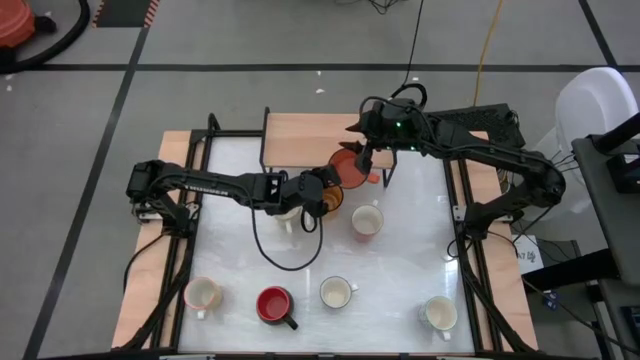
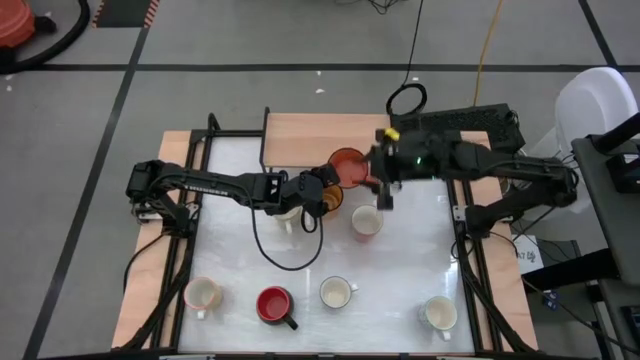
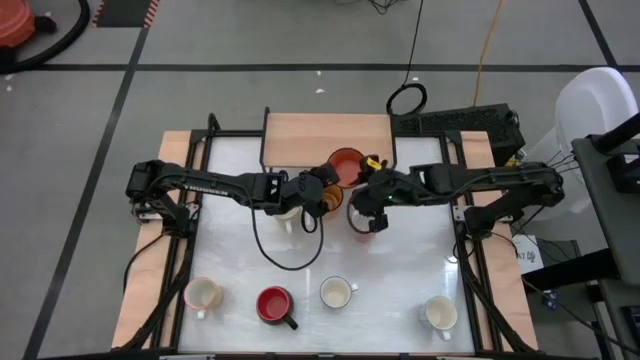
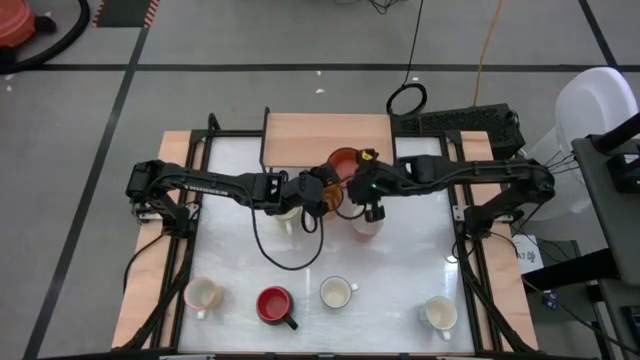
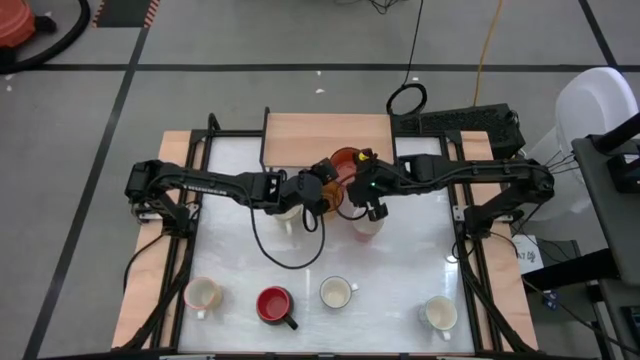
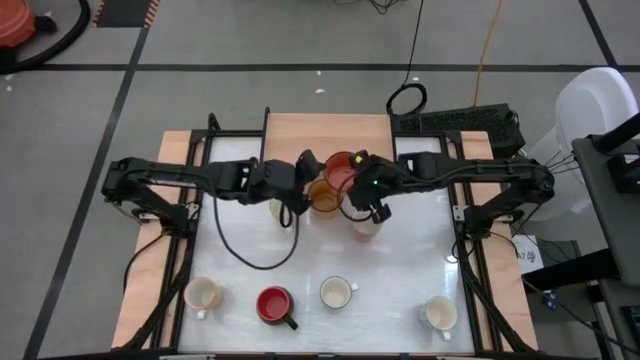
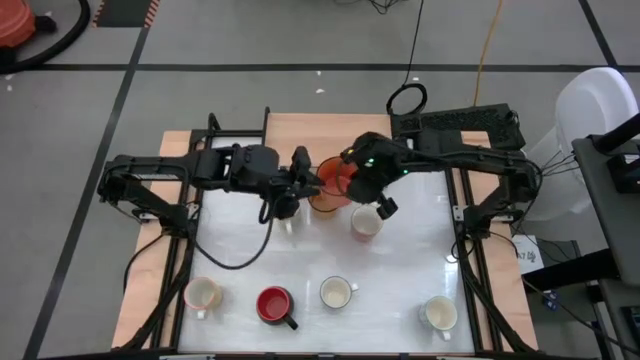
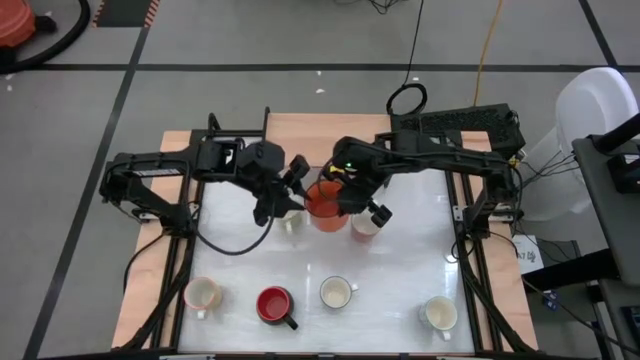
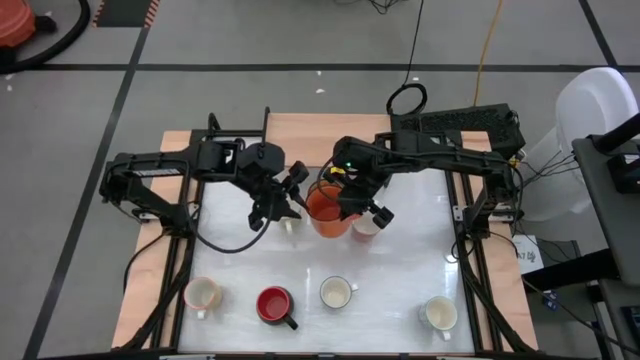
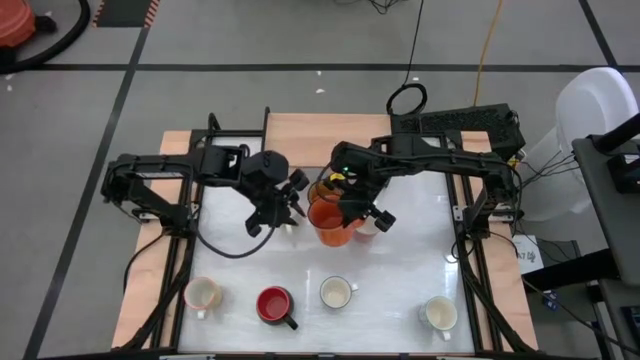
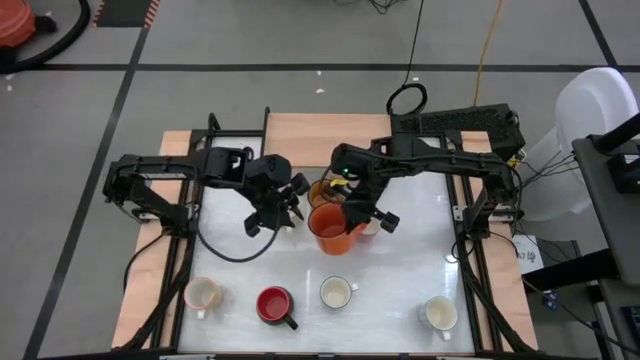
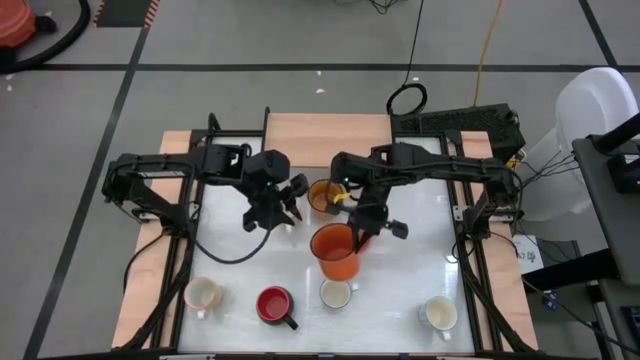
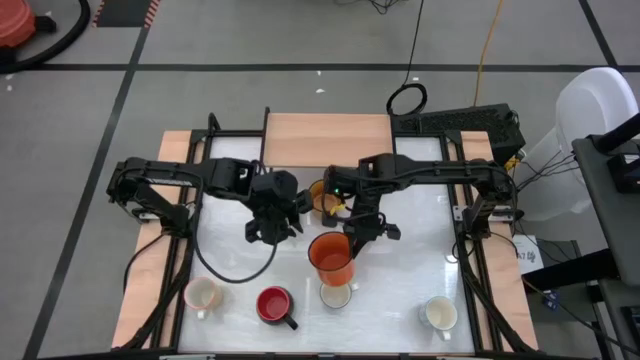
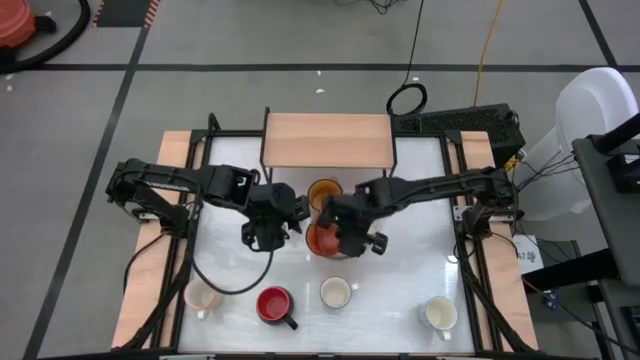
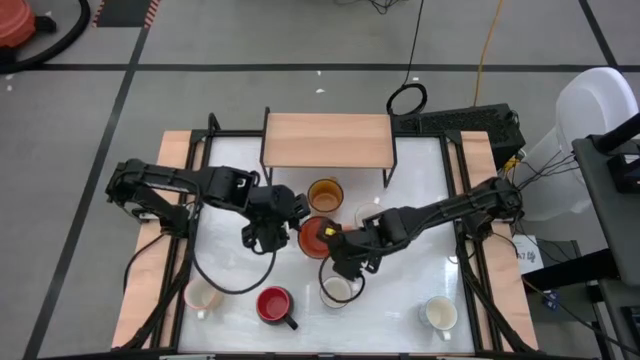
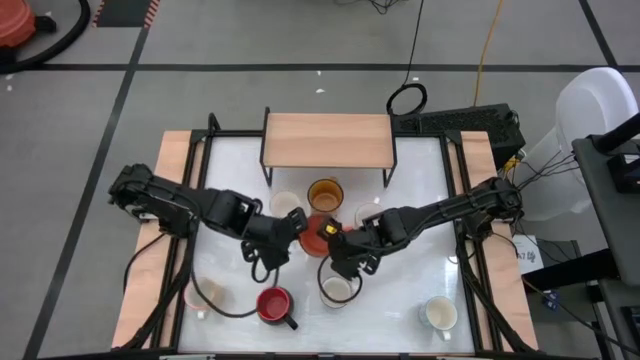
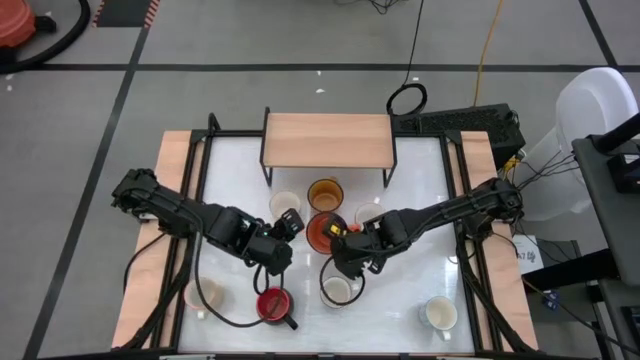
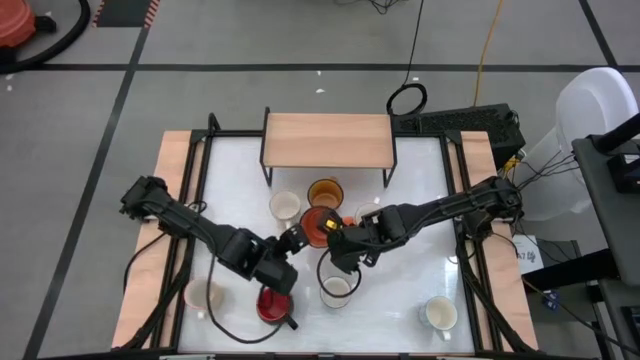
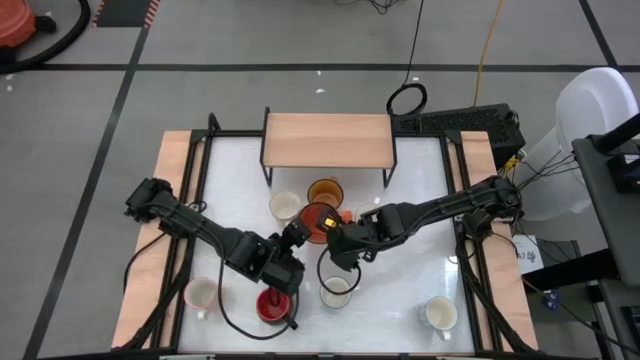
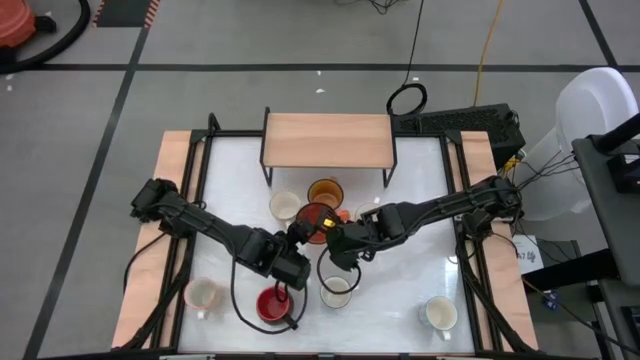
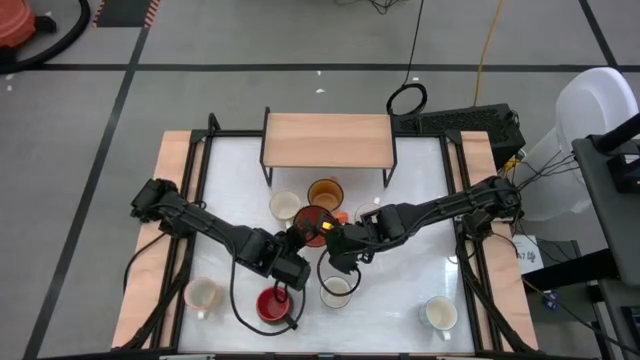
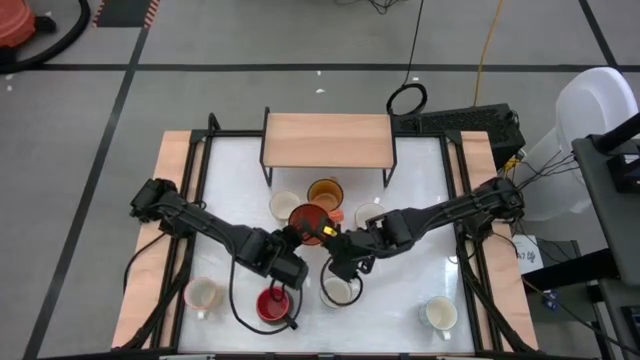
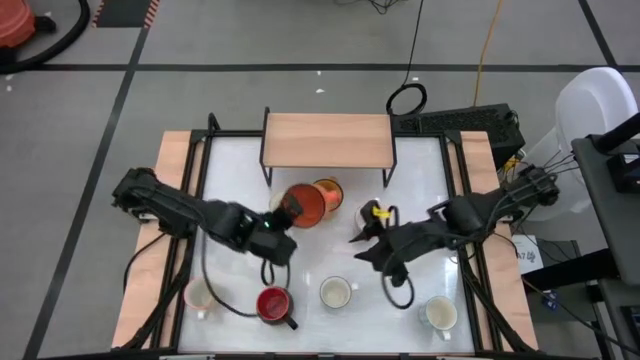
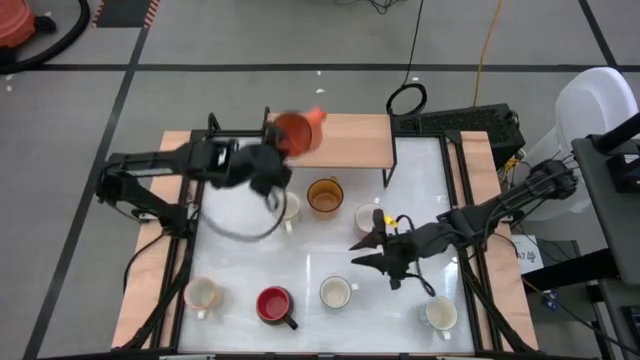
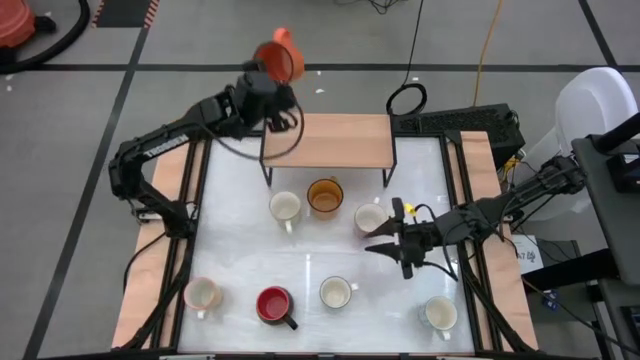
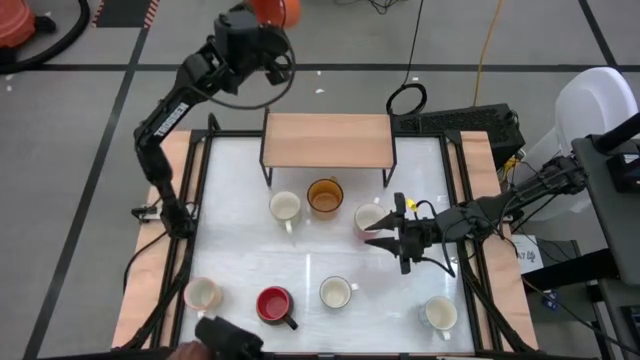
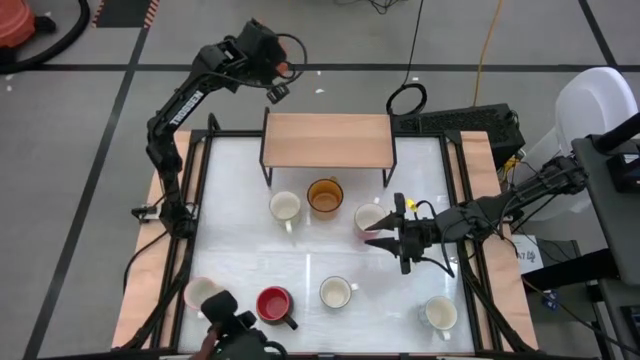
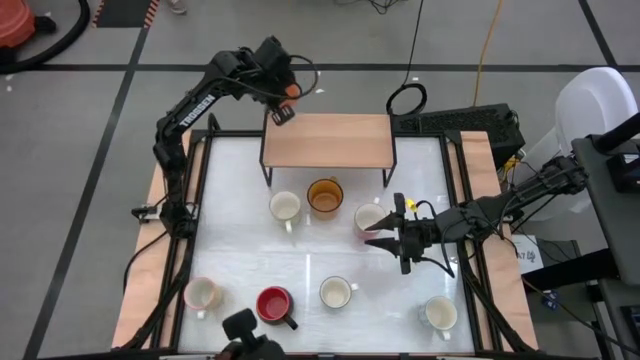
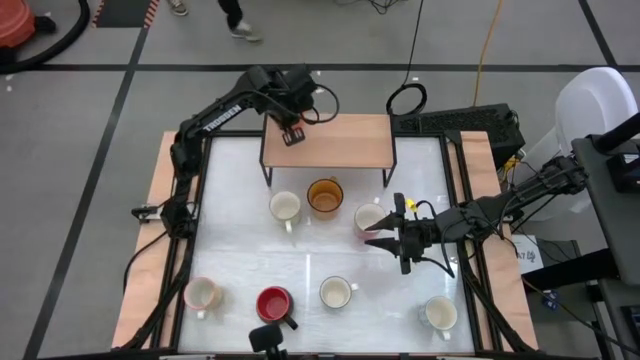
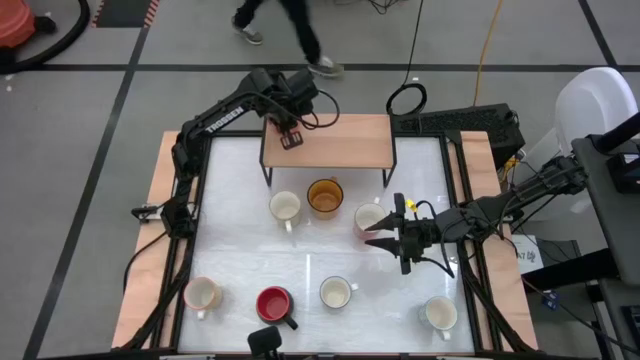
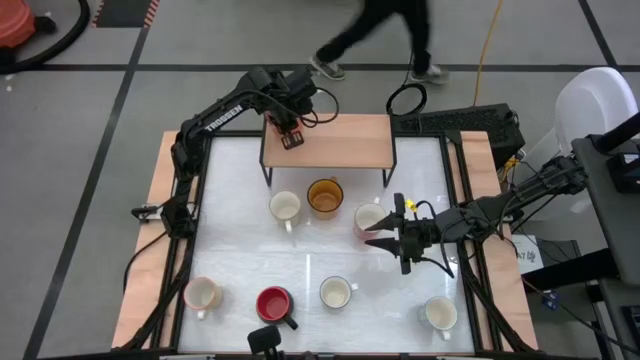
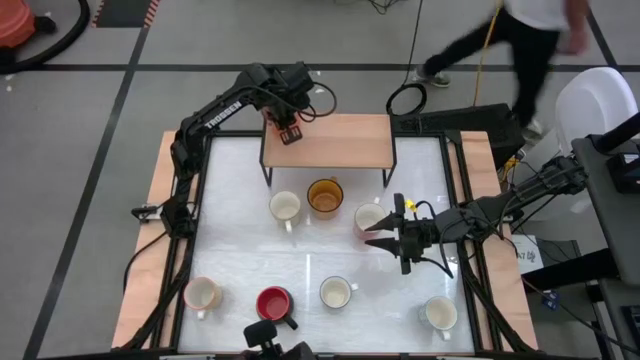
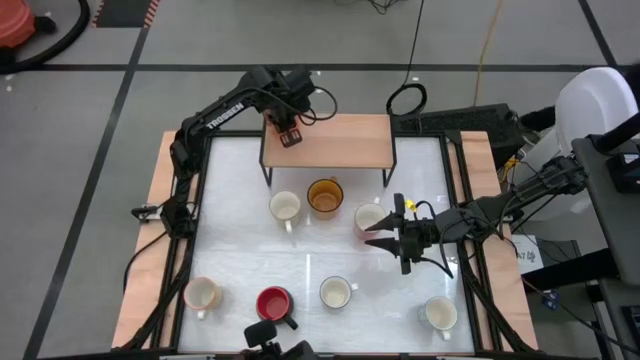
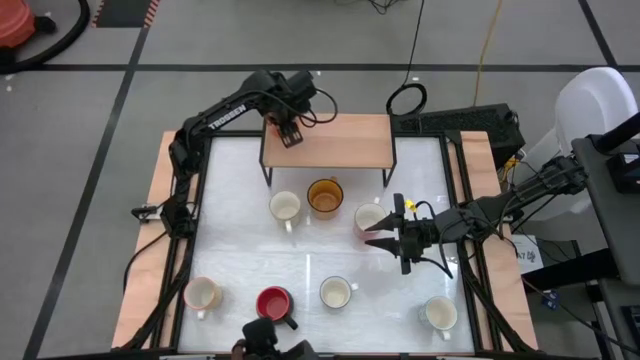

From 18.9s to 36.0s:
Task: Place coffee mugs
Put the orange mug on the shelf

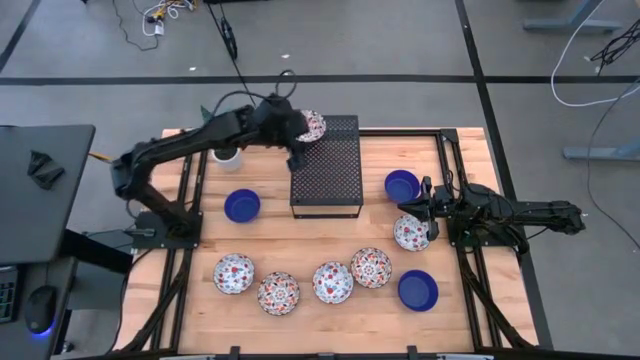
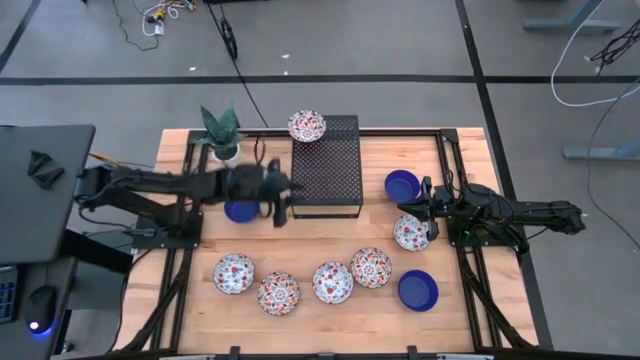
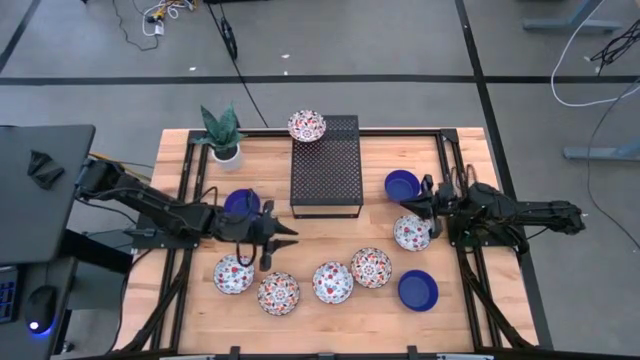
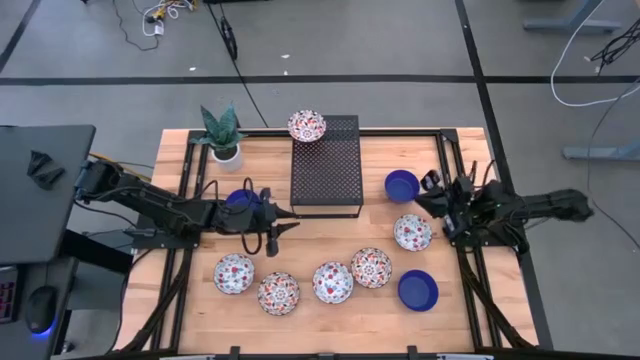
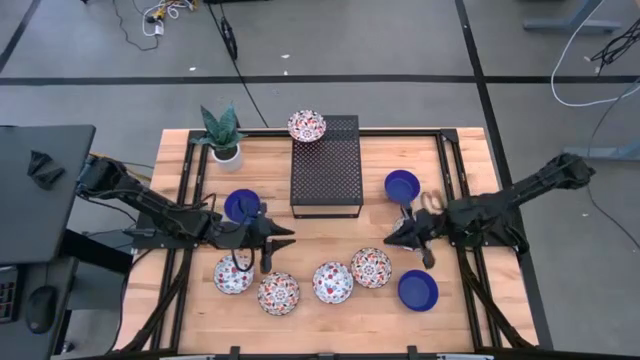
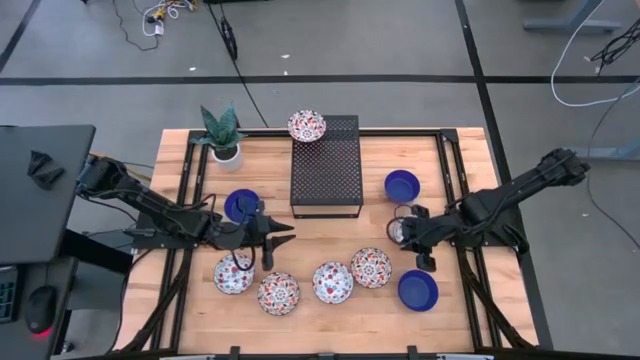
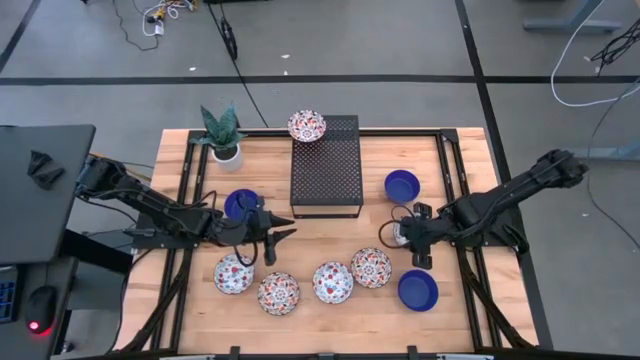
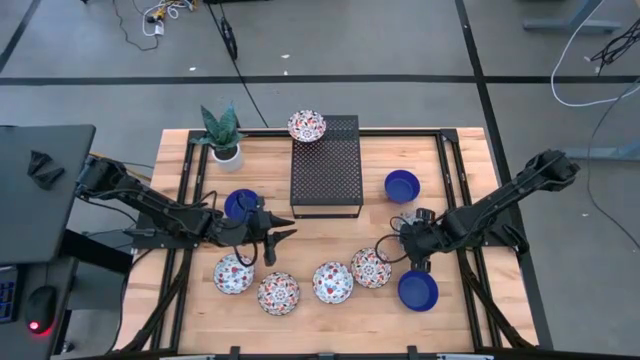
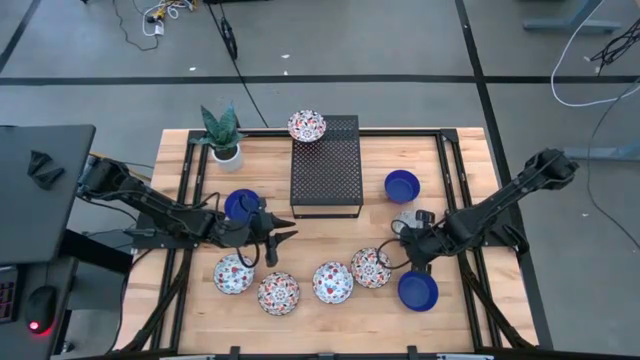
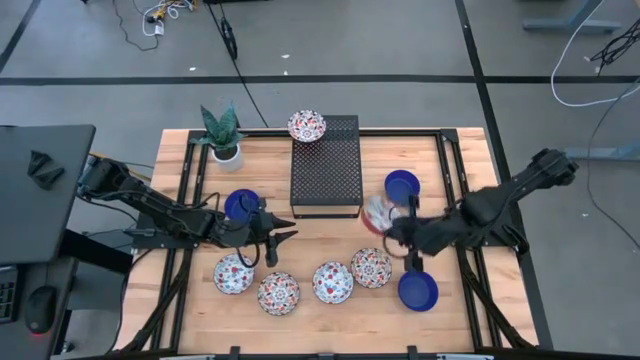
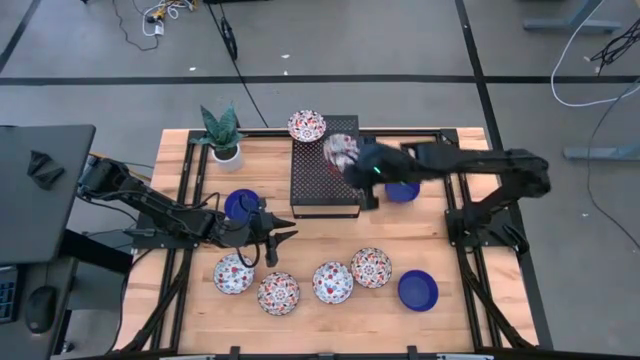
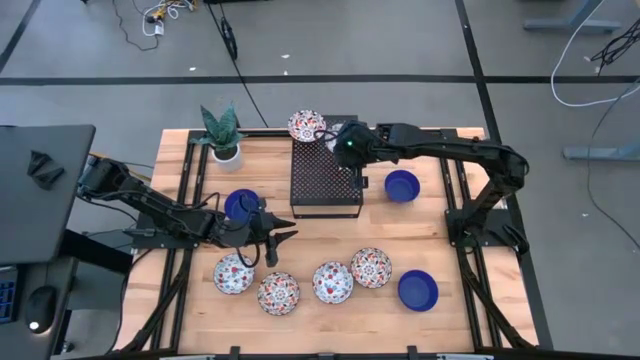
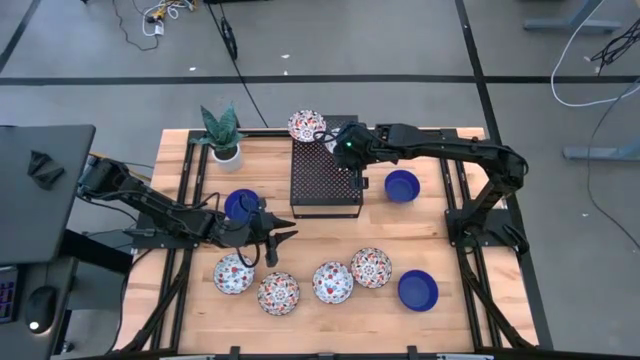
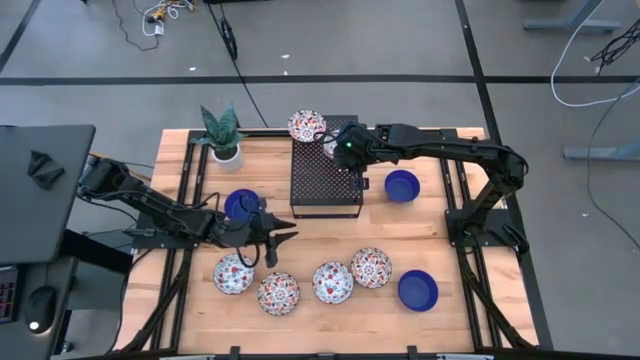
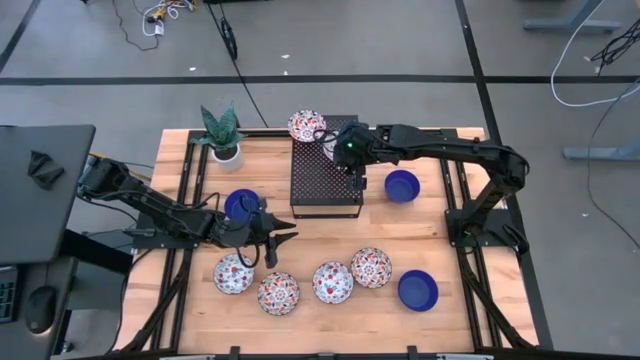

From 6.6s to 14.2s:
Task: Pick & Place Mini bowls
Put the red patterned bowl on the shelf
